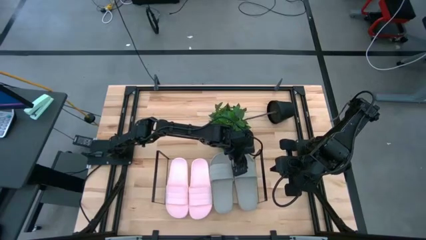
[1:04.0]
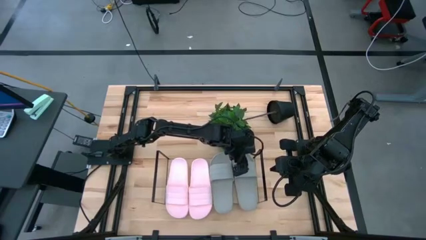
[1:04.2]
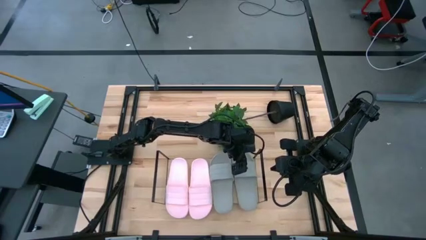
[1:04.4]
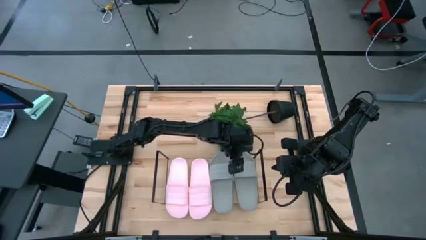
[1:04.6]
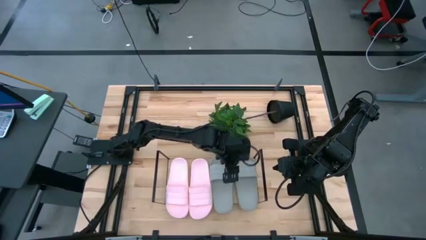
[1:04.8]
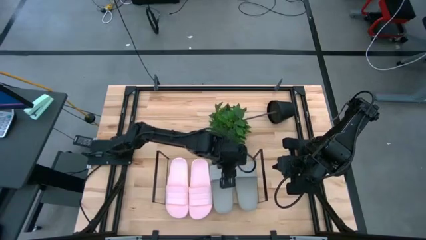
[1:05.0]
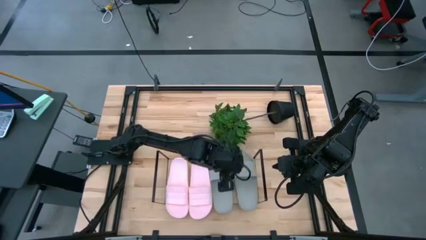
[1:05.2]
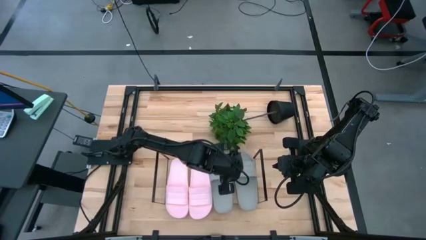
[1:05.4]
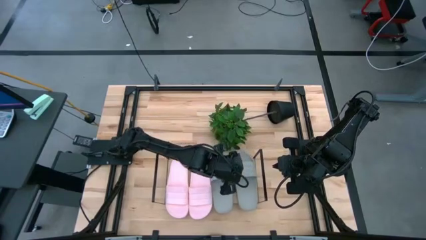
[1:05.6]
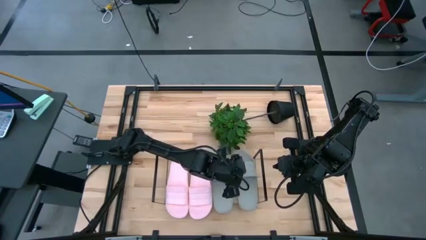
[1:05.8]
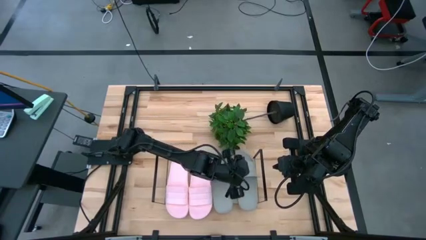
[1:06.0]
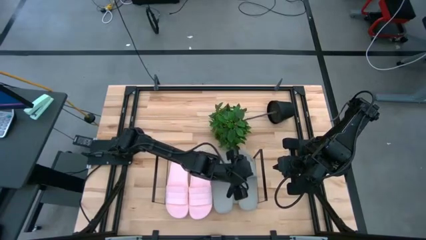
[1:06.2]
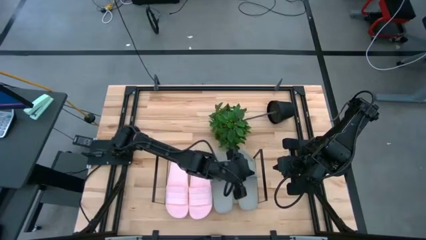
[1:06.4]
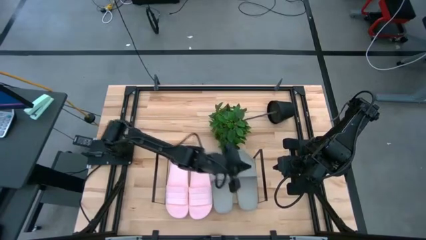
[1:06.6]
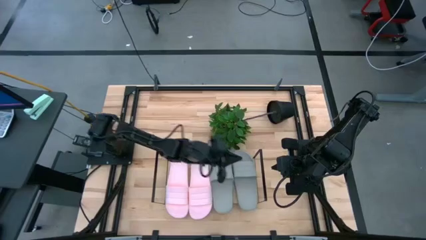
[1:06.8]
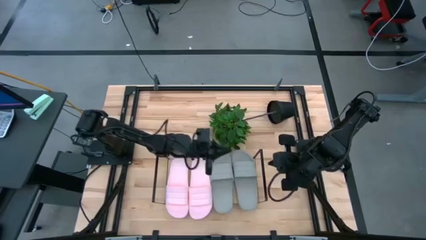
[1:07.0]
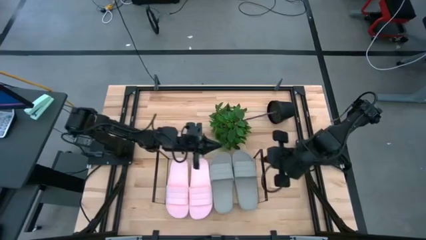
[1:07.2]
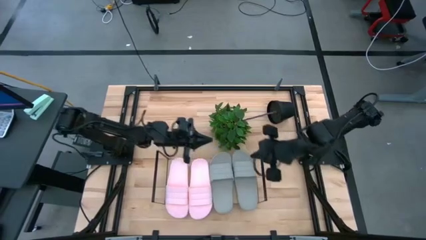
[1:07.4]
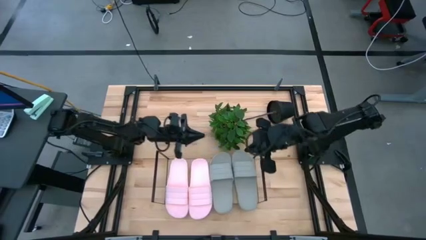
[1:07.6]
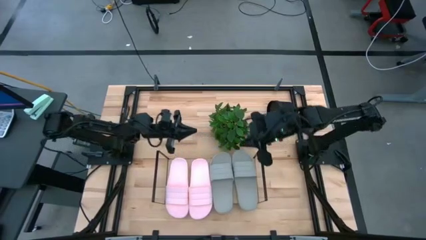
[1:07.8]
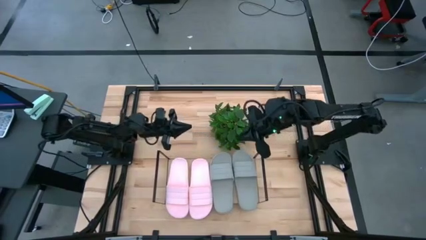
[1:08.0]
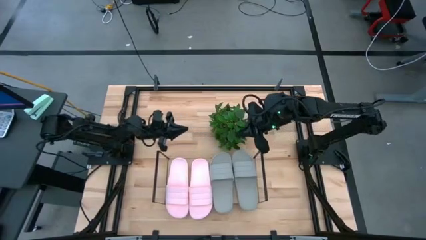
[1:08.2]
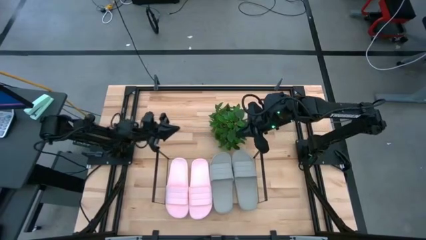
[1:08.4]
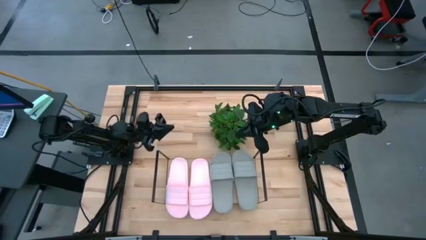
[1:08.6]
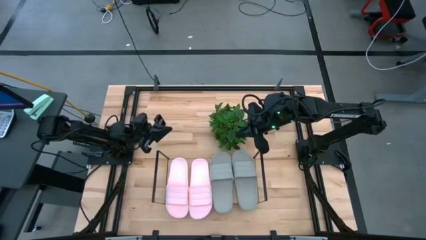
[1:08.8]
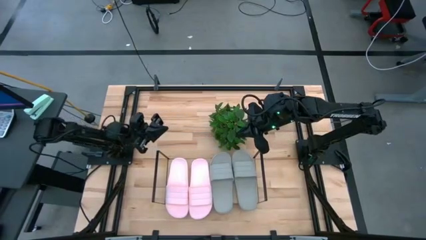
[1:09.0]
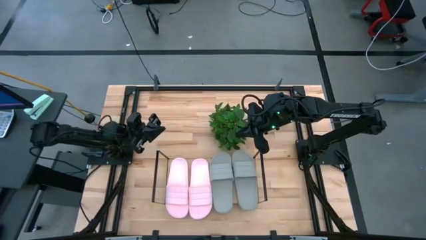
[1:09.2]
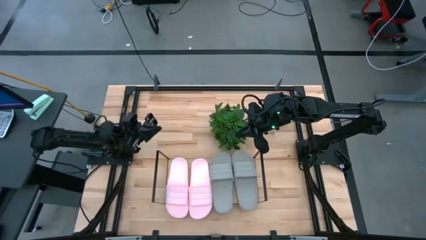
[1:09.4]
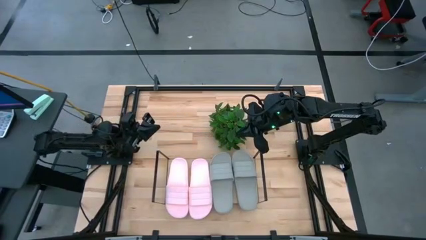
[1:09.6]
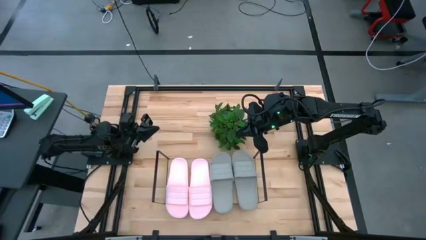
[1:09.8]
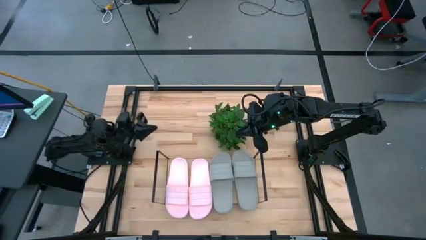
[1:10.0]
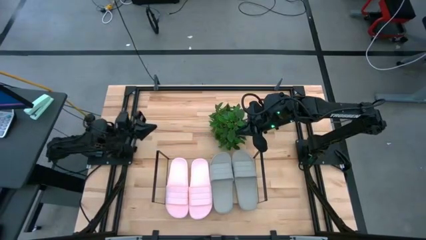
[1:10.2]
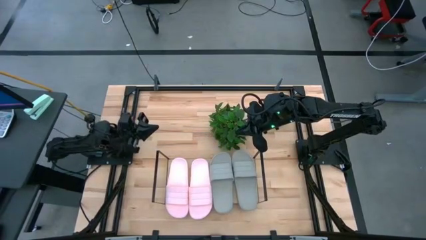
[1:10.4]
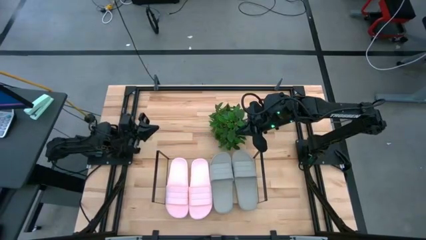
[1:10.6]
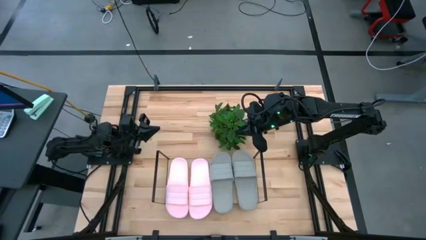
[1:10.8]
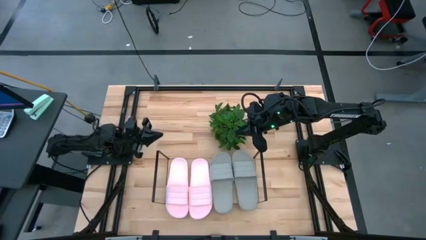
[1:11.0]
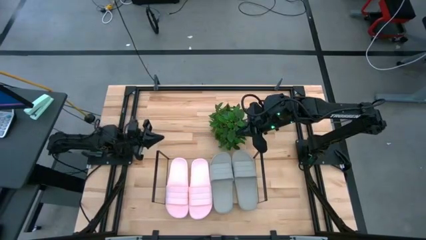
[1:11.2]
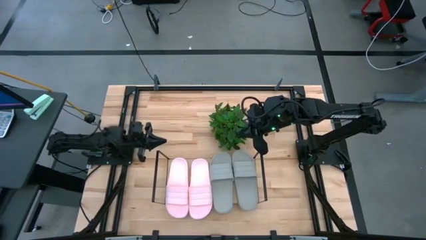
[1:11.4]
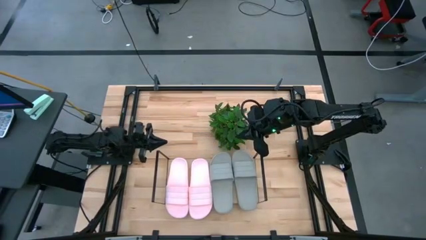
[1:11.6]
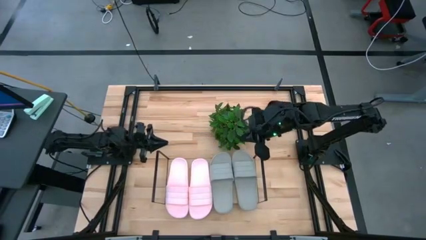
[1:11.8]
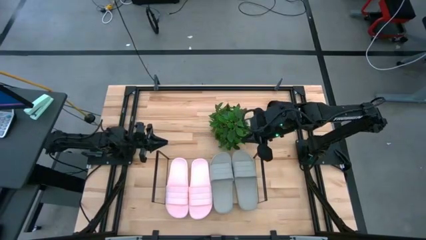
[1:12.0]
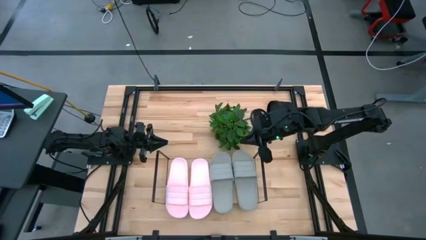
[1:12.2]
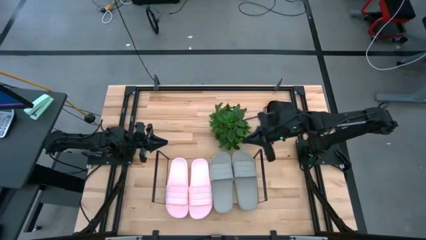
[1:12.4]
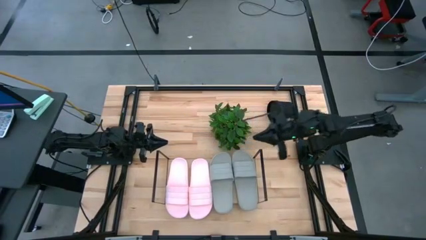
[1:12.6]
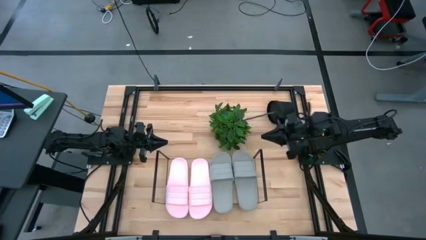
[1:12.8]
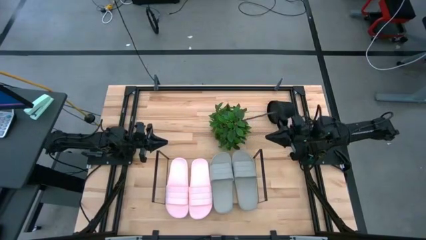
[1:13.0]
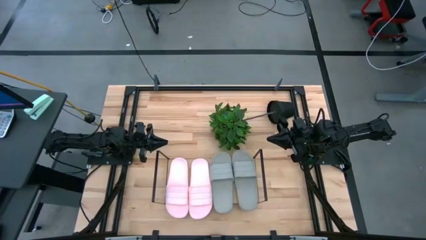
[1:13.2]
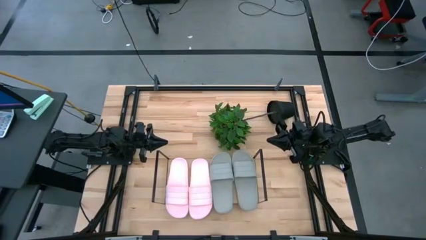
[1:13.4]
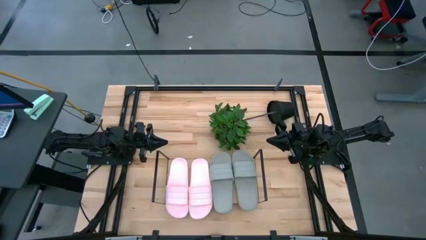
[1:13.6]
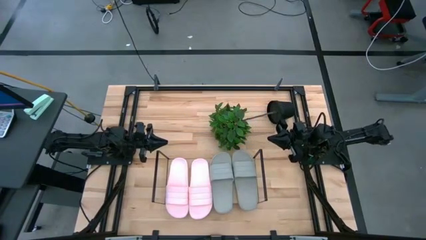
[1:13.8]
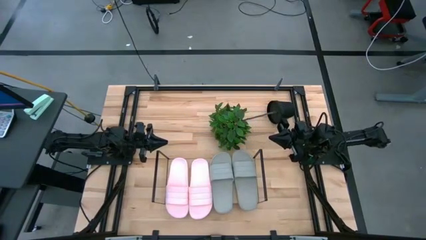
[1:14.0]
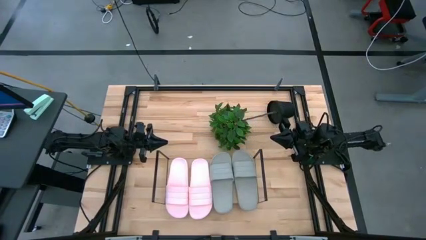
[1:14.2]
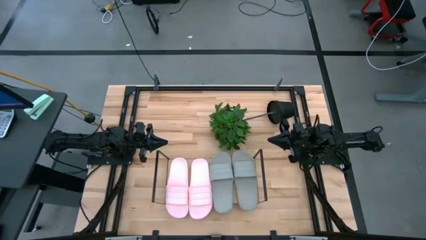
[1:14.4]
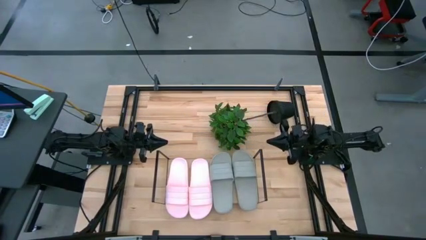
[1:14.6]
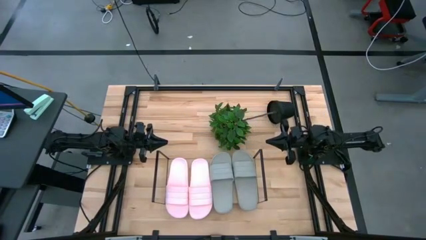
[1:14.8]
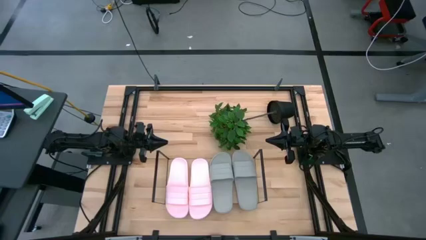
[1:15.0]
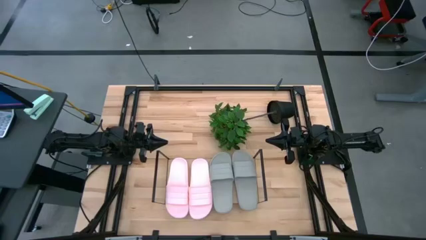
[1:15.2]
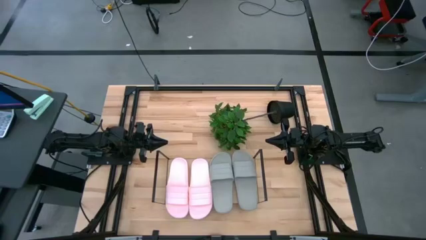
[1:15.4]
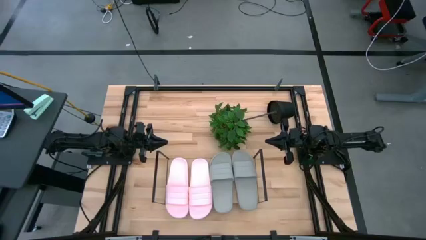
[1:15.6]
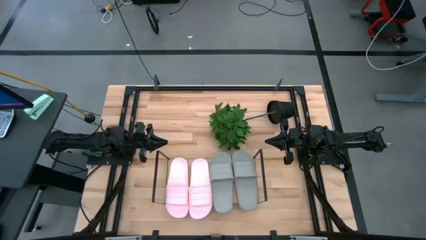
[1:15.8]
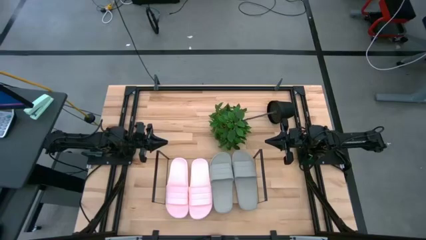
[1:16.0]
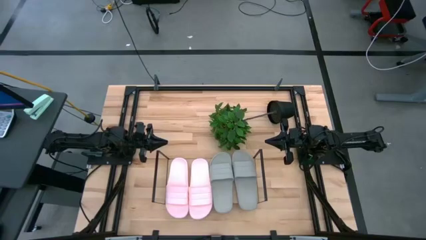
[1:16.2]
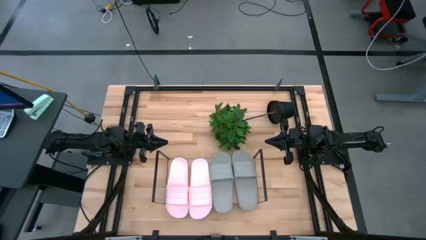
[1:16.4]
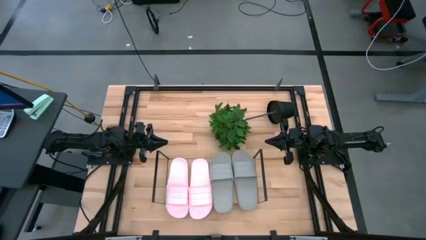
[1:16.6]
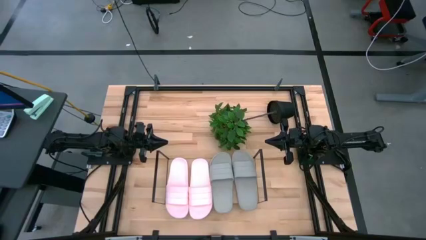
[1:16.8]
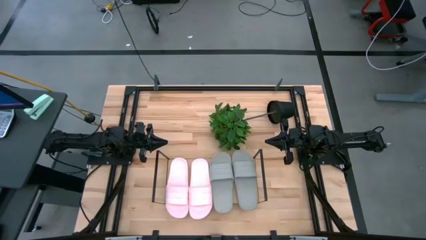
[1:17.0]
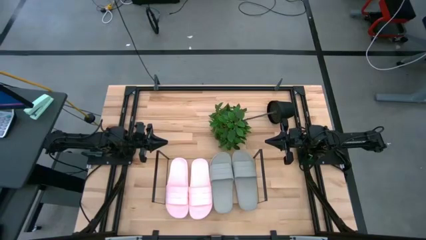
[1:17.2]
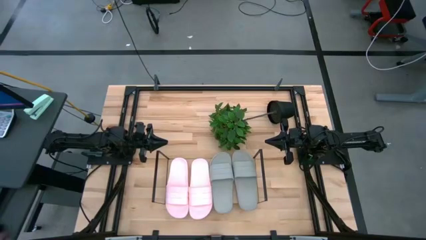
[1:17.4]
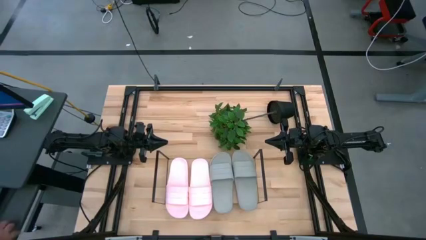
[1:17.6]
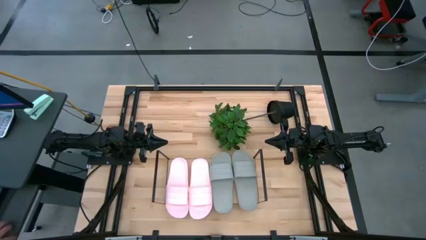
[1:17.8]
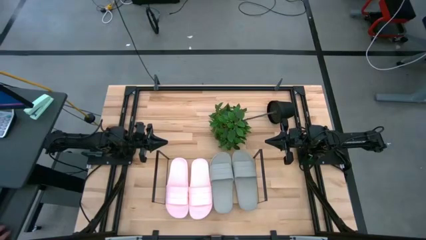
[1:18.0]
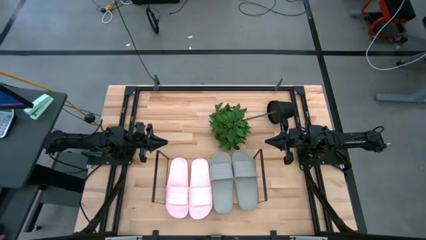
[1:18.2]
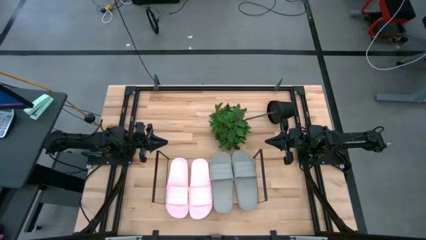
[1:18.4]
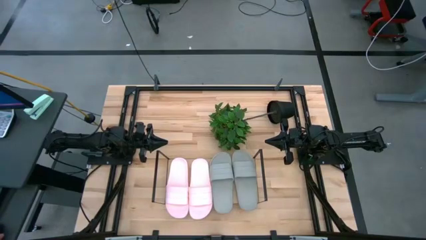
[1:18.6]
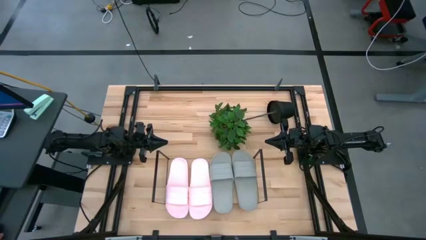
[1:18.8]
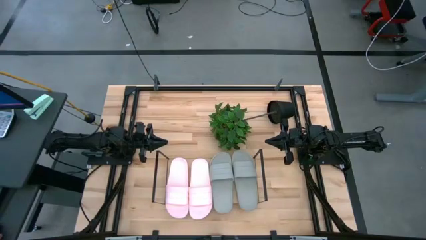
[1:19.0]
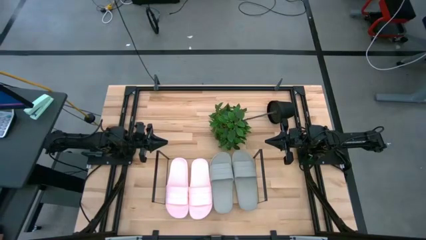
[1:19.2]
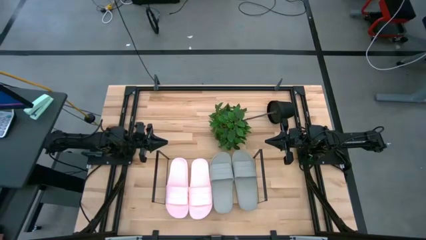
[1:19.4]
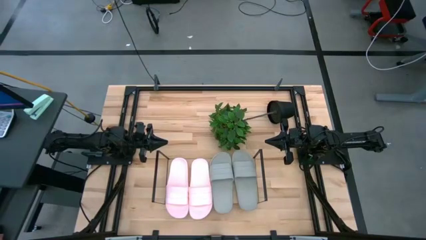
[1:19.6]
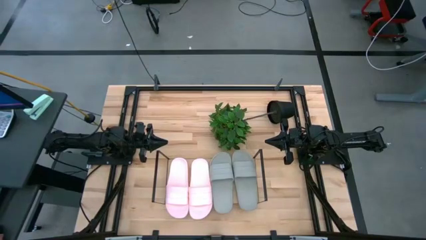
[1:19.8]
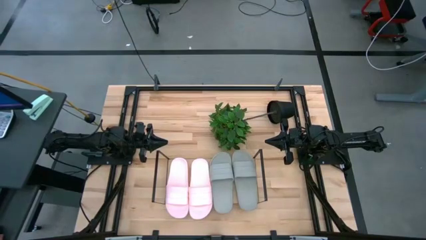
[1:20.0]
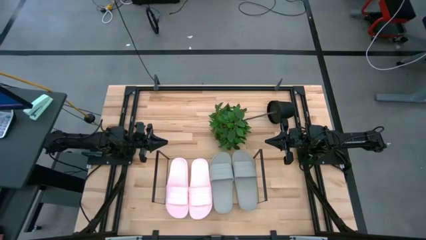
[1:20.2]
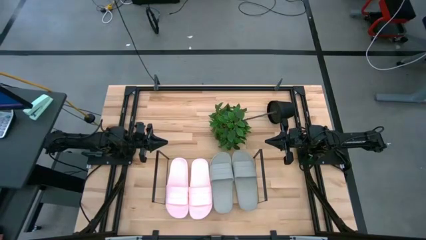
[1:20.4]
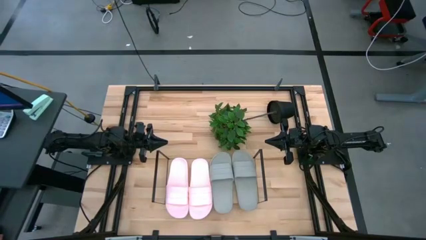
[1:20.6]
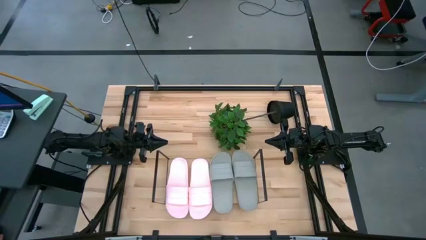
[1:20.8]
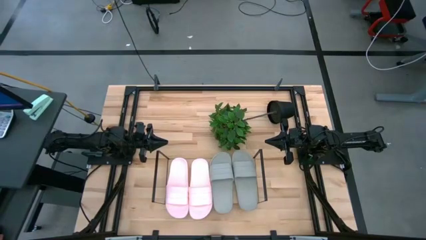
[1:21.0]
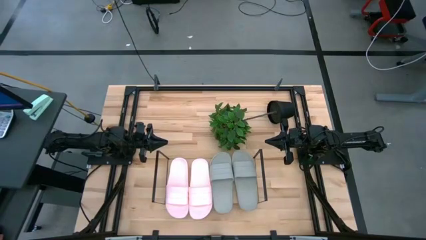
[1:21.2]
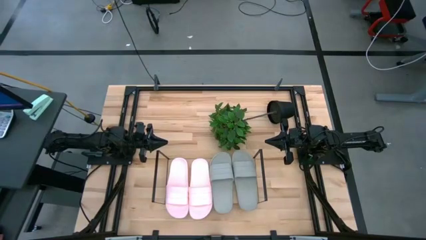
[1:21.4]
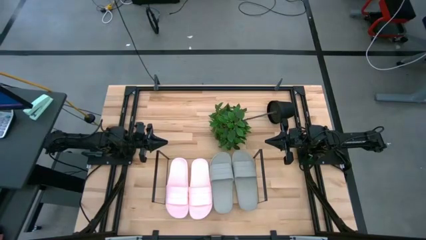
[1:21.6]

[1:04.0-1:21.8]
Task: Pick and place slides into the shelf
Return to Home Position
